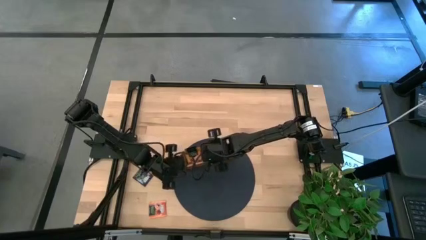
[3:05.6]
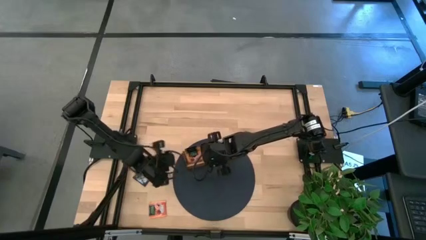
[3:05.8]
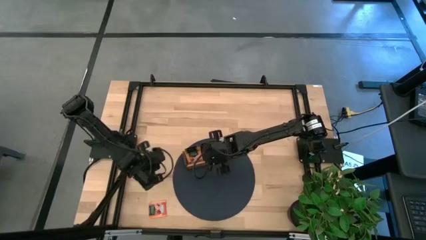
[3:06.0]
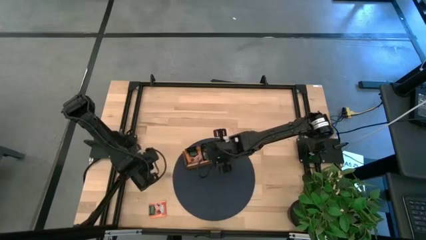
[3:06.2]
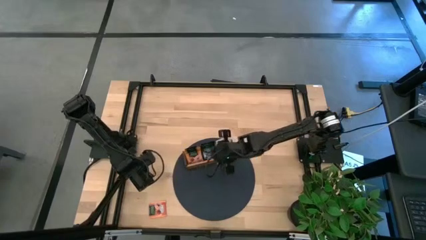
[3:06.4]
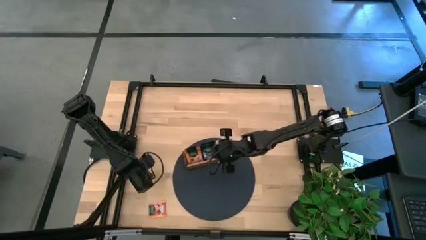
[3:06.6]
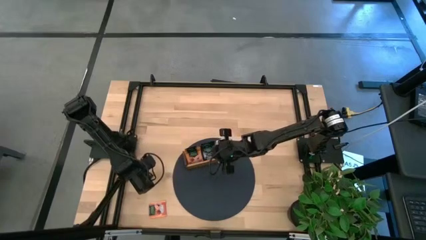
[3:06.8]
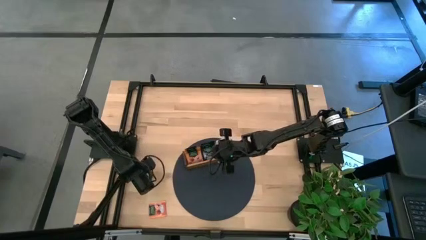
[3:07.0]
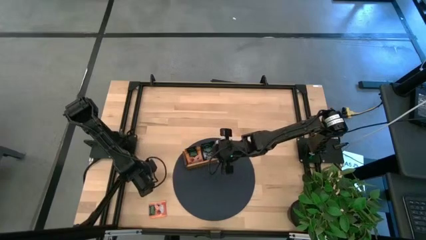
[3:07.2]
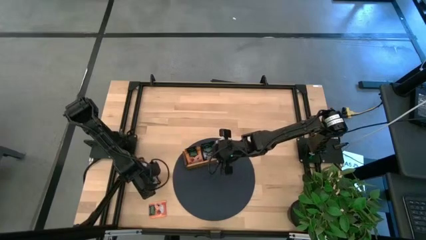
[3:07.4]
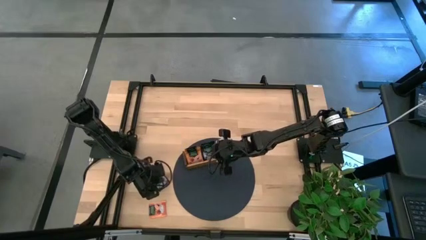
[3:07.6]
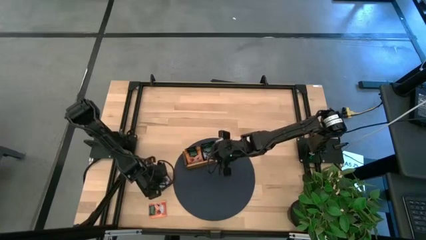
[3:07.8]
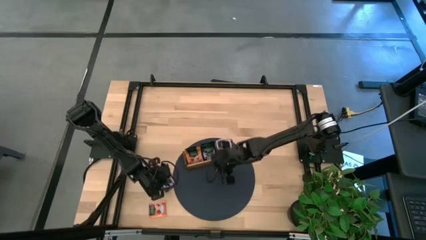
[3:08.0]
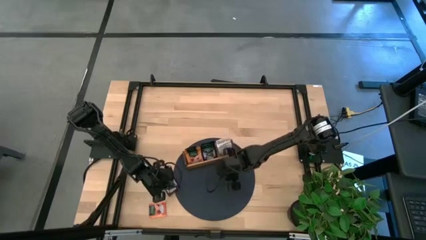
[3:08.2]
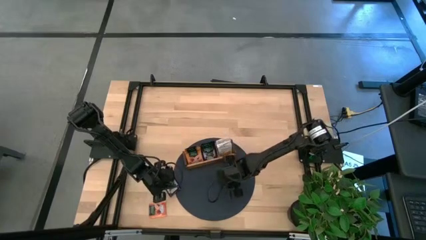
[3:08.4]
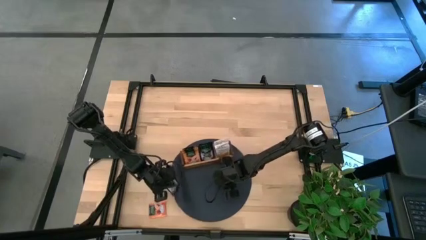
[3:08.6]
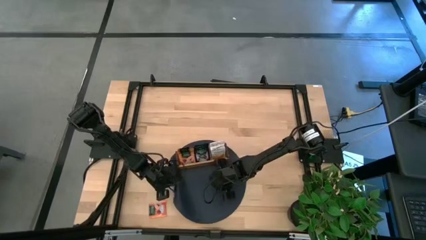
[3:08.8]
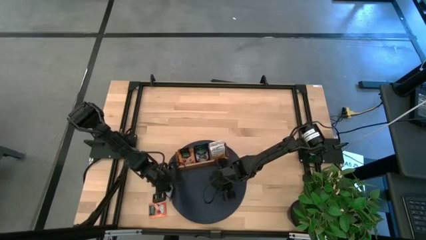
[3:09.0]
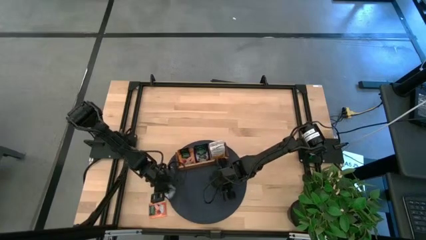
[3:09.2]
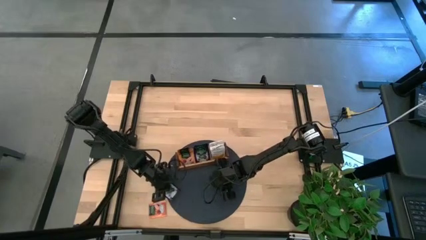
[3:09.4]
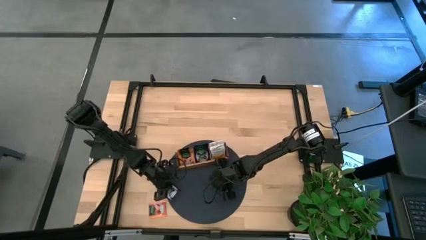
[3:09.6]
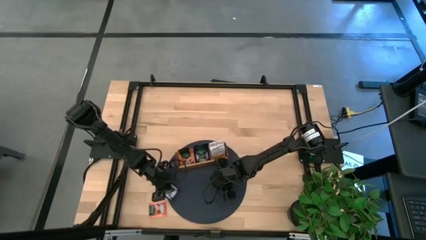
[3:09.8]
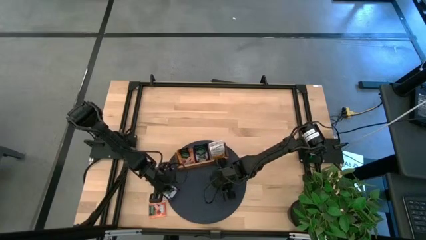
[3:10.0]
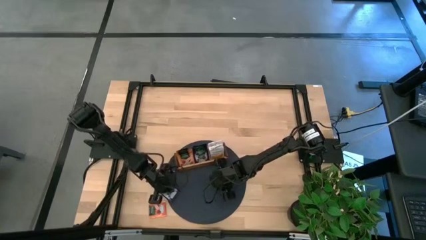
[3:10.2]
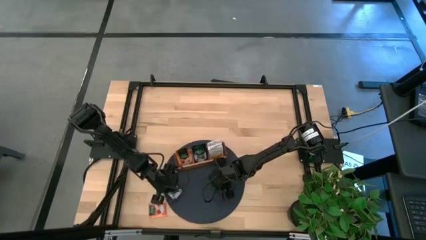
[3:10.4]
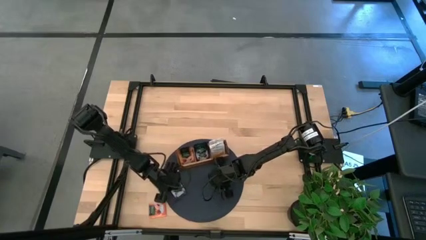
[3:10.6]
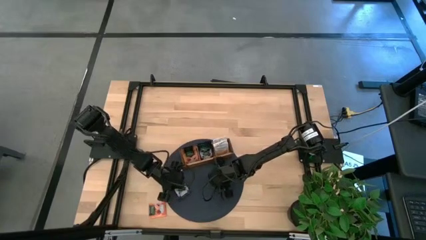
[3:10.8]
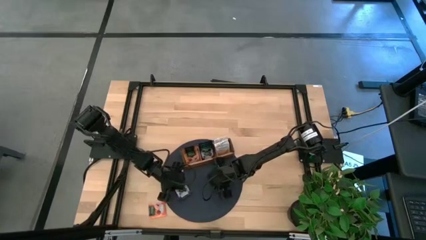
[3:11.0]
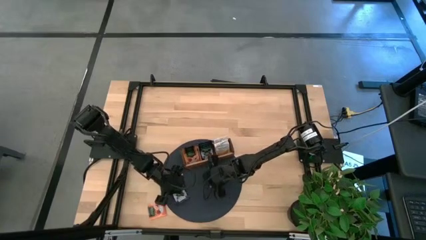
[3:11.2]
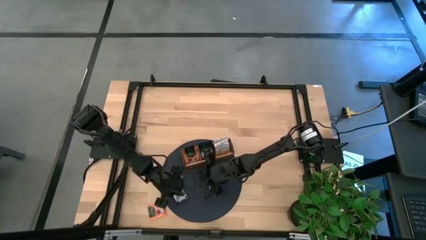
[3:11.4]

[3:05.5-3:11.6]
Task: Pick & Place Tea
Adjust the black tea bag on the table

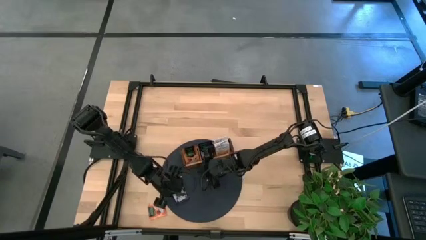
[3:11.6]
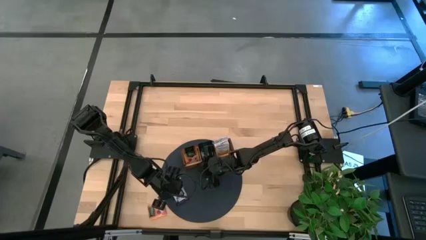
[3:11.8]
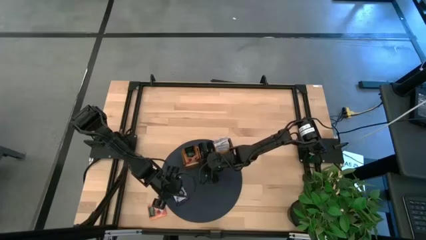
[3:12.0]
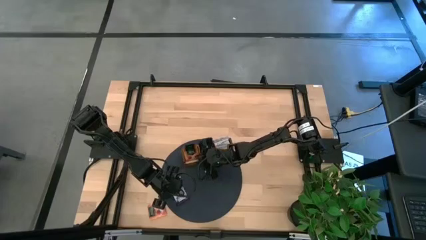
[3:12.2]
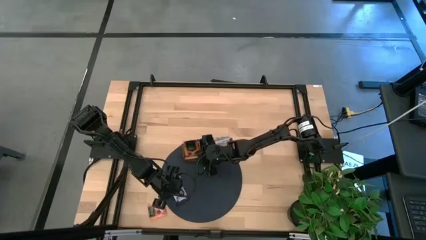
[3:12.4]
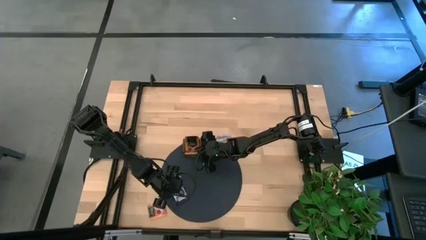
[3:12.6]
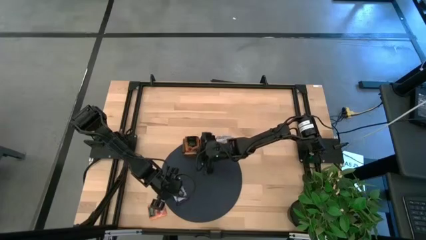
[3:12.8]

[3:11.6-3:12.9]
Adjust the wooden organizer on the table

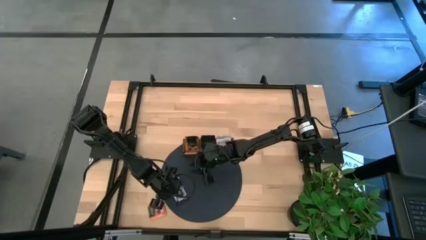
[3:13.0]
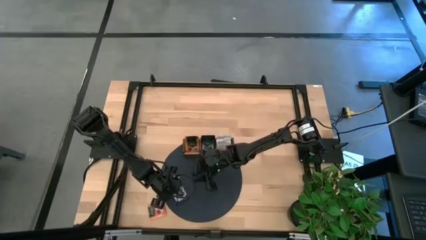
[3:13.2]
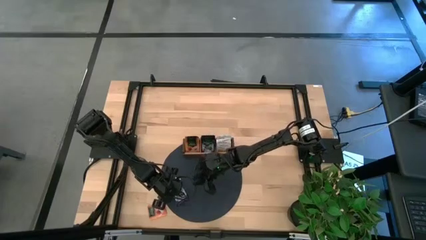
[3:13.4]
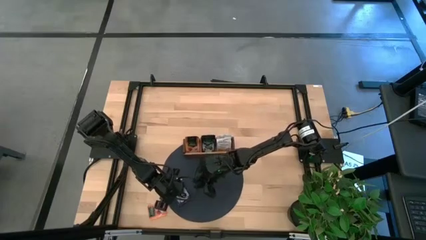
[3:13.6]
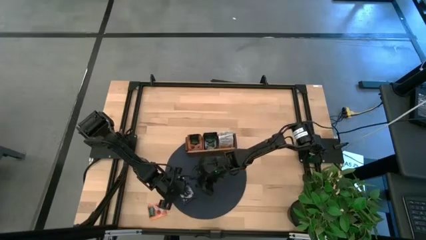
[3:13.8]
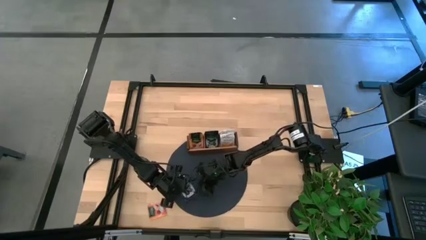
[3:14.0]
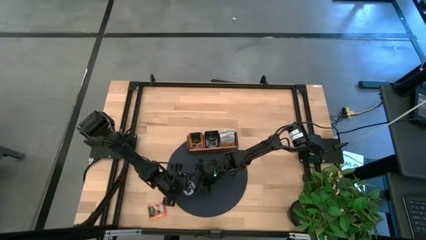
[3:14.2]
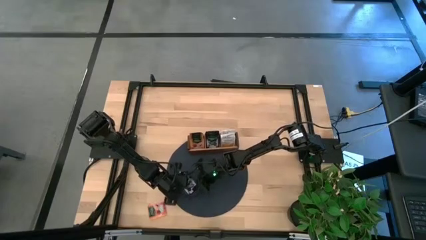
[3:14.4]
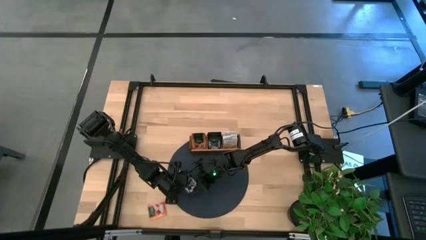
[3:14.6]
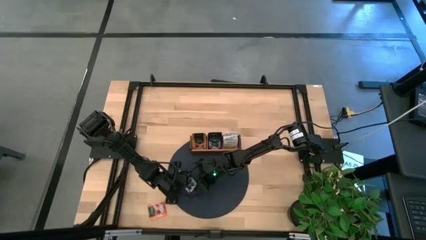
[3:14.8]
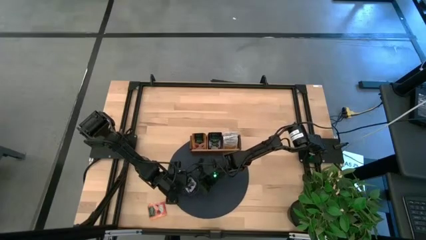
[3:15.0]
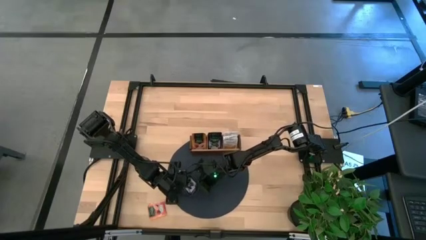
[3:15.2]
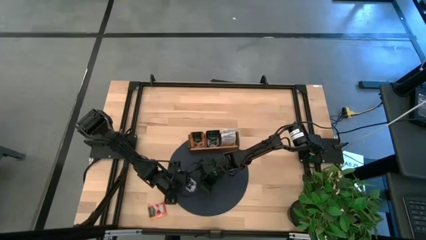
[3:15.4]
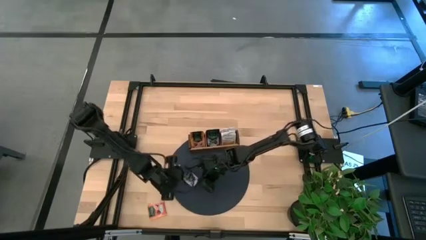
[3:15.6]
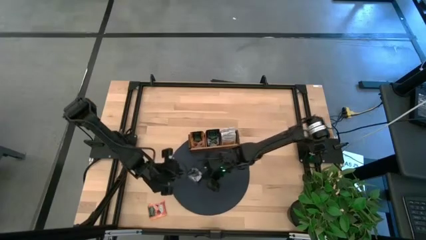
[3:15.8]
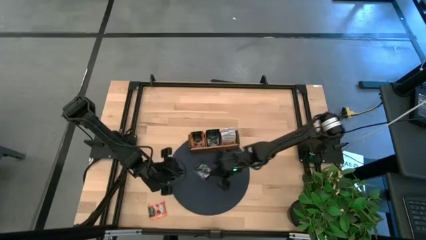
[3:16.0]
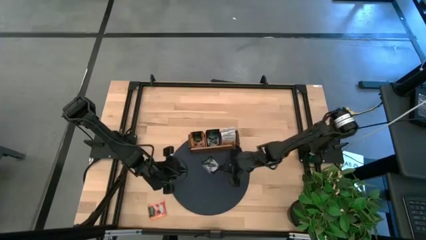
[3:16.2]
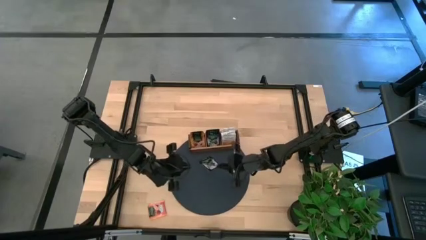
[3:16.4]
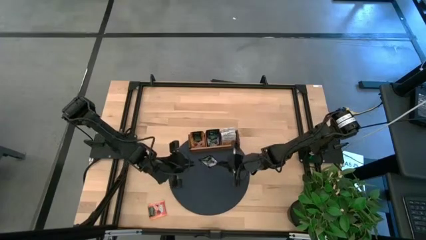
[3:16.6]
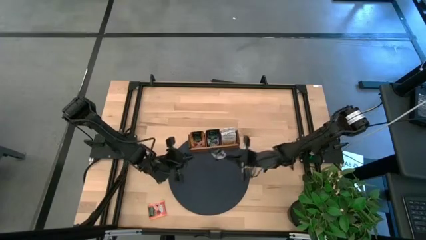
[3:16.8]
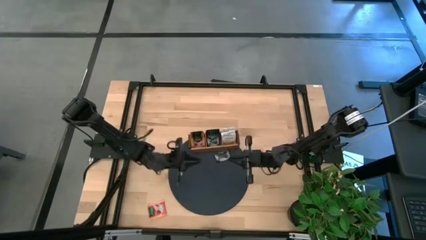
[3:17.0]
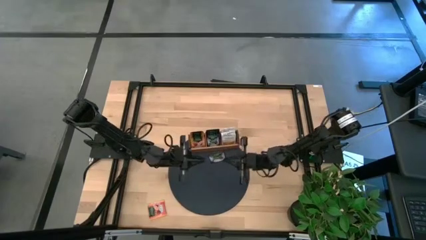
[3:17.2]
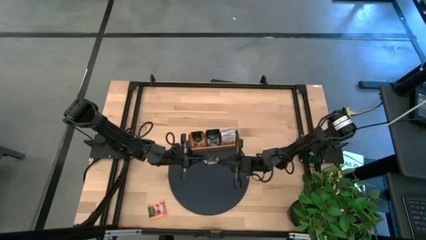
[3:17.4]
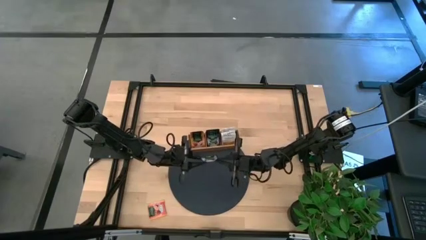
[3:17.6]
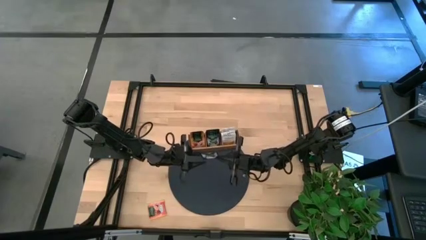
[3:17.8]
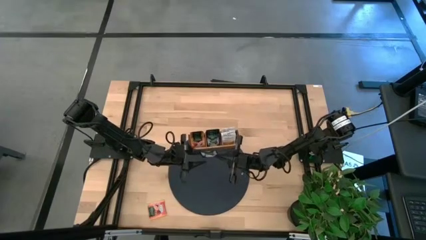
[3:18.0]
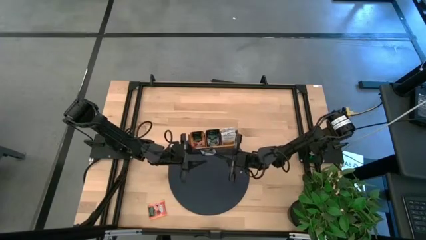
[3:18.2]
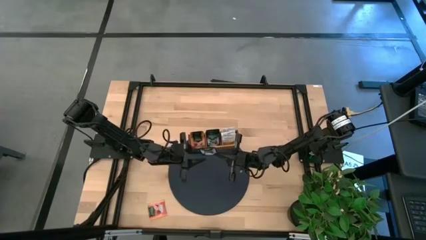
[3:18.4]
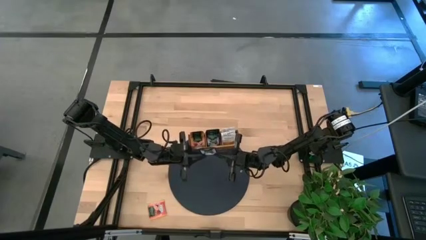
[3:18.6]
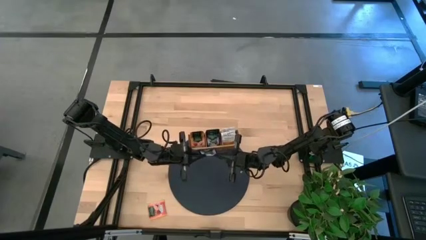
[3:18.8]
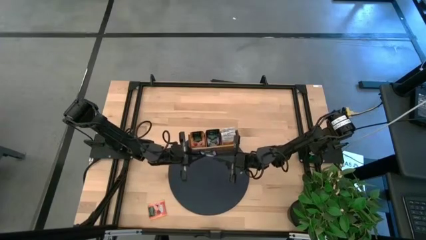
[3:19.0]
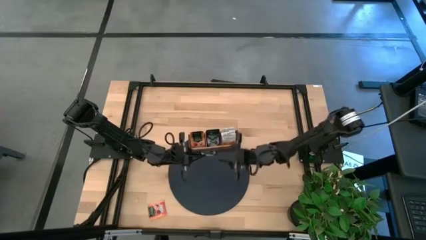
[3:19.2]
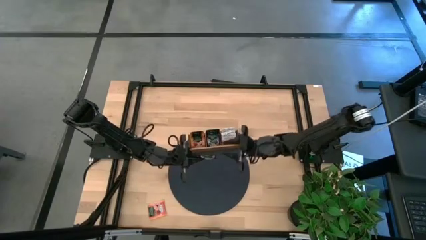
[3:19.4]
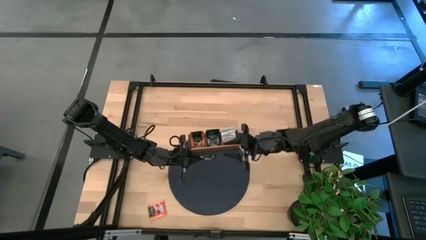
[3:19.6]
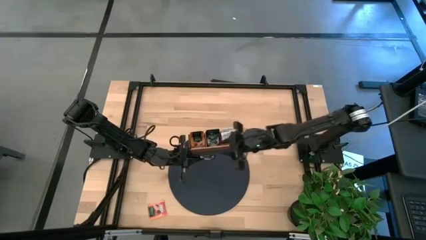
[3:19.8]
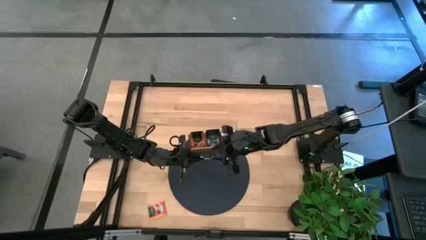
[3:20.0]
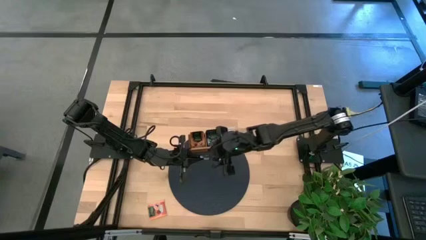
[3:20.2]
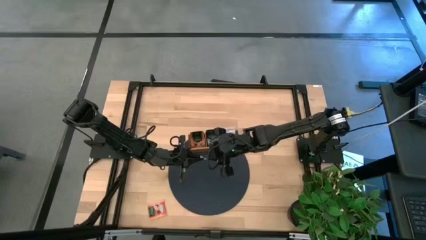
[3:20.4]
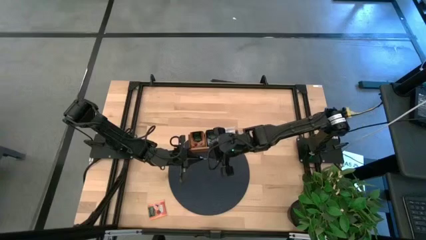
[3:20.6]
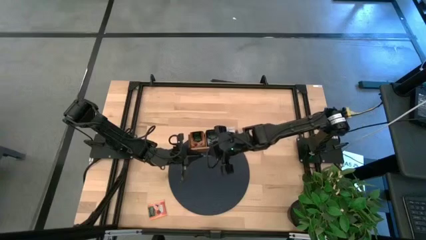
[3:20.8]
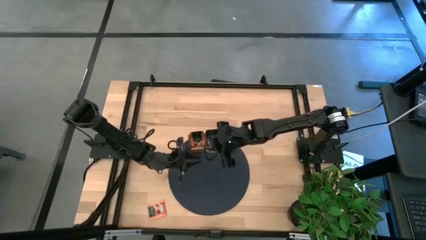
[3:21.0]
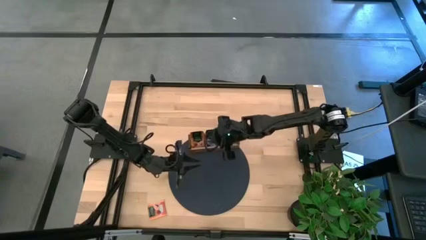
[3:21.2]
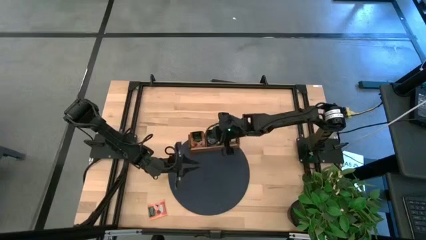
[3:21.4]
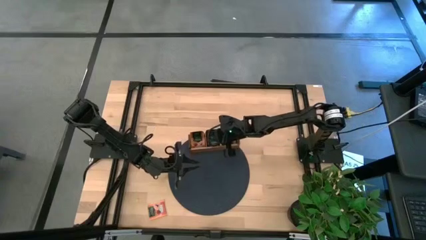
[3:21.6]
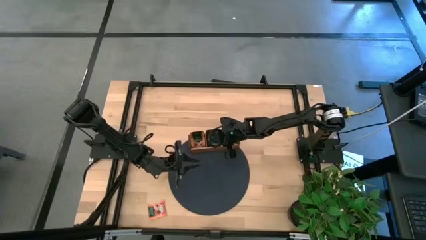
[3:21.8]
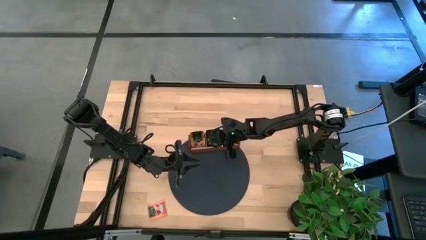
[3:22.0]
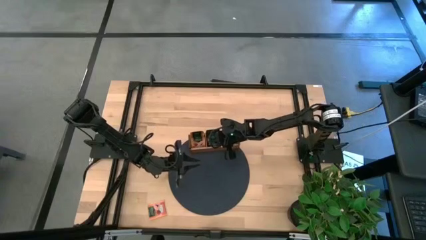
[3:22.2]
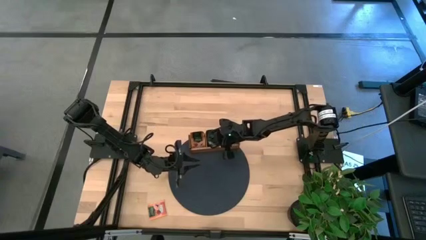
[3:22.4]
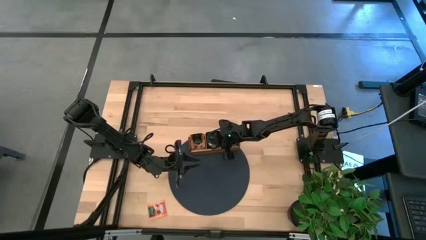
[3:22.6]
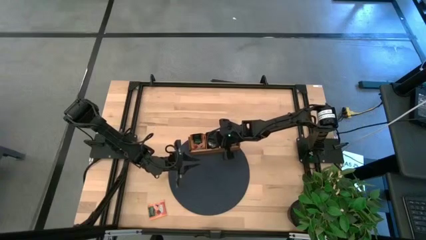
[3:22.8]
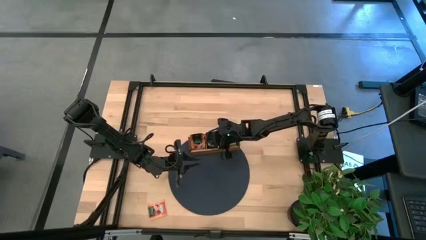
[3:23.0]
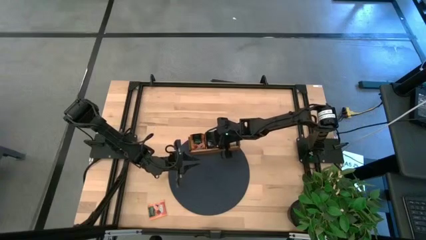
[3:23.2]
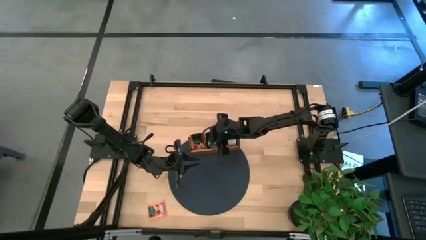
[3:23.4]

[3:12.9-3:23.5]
Put the black tea bag into the middle section of the wooden organizer
